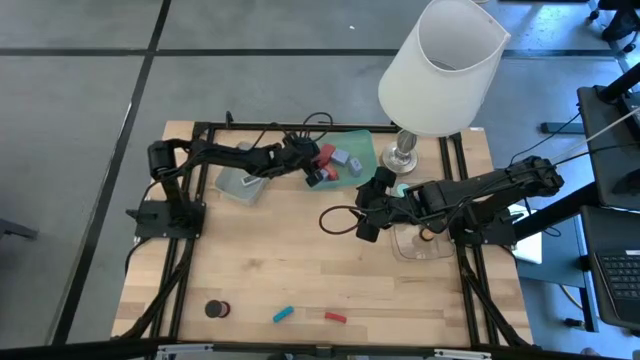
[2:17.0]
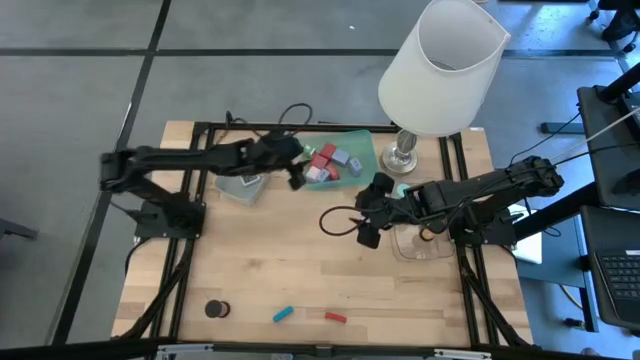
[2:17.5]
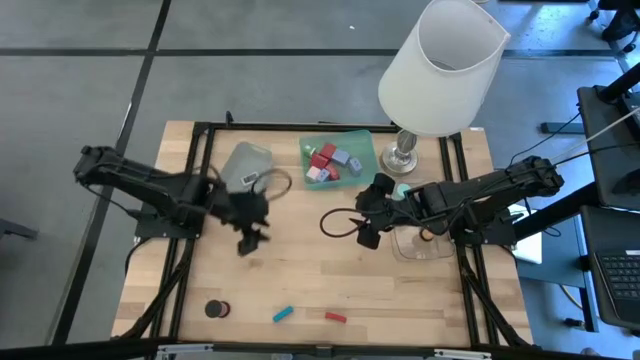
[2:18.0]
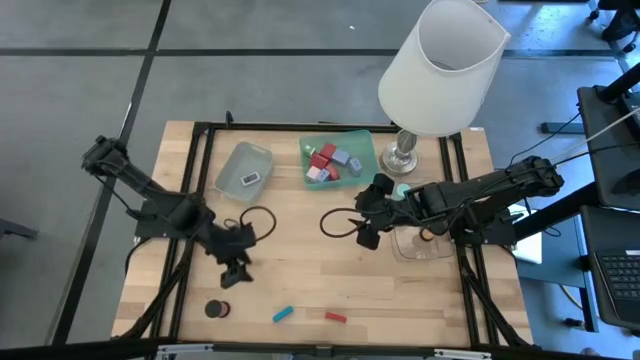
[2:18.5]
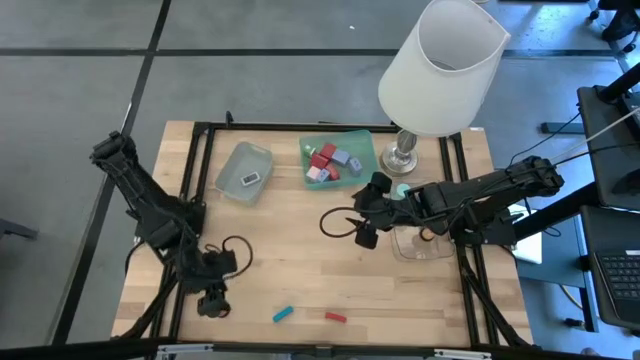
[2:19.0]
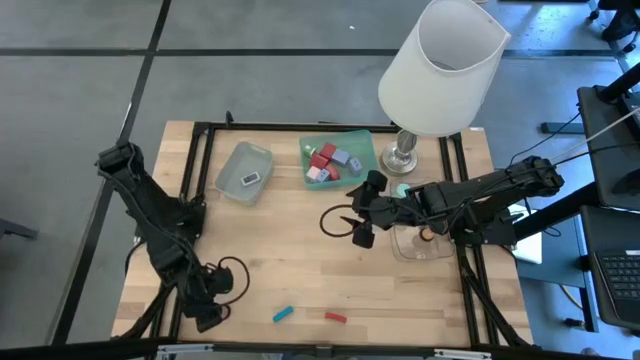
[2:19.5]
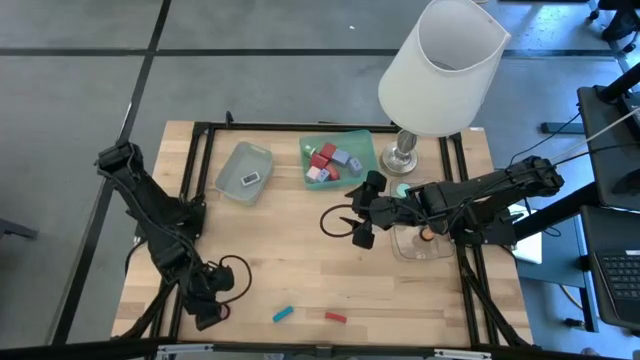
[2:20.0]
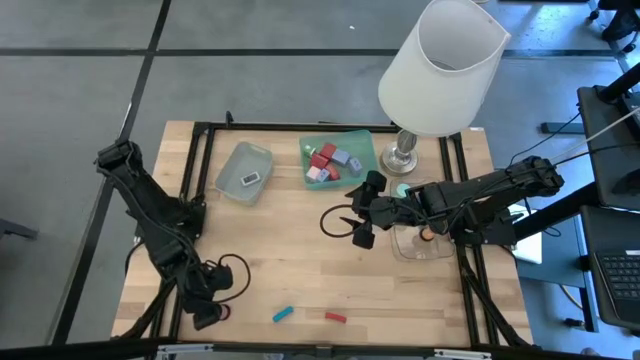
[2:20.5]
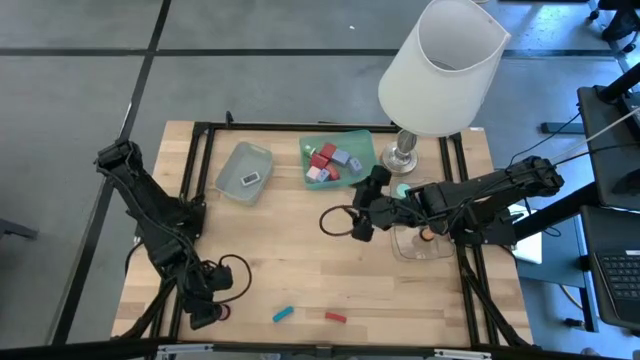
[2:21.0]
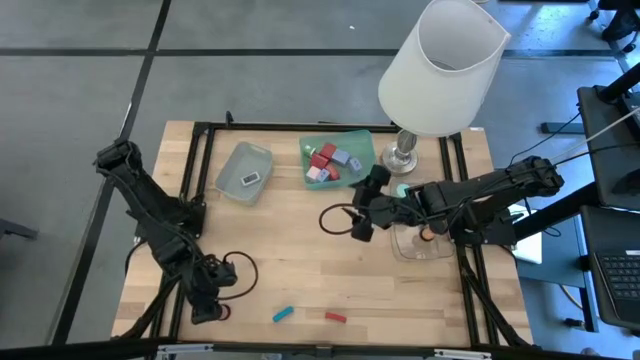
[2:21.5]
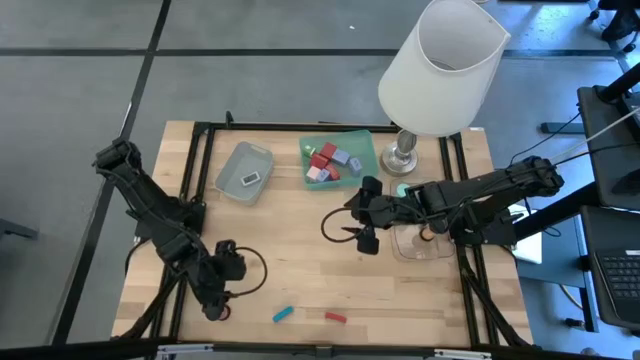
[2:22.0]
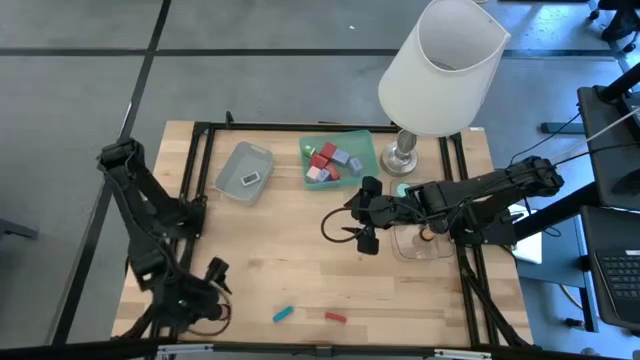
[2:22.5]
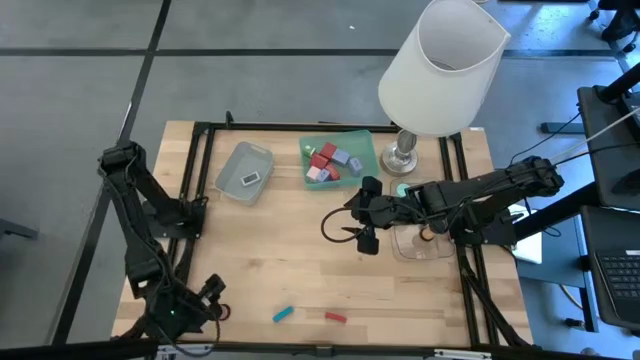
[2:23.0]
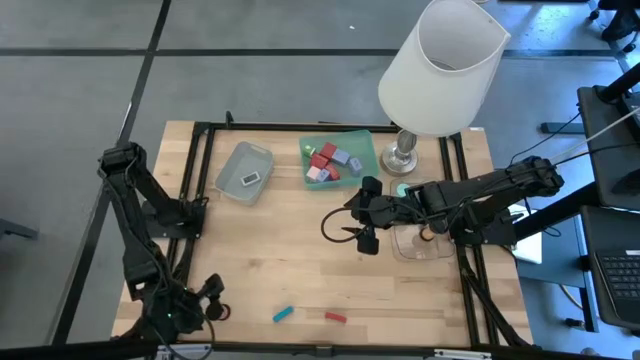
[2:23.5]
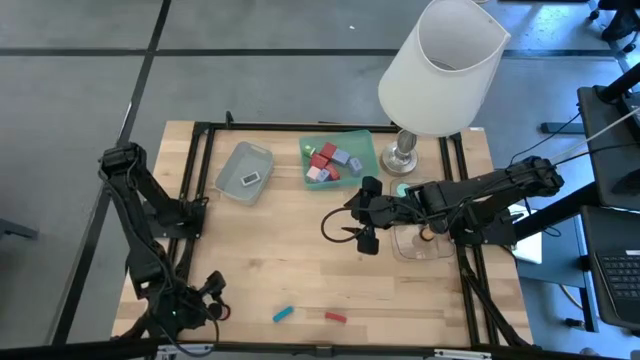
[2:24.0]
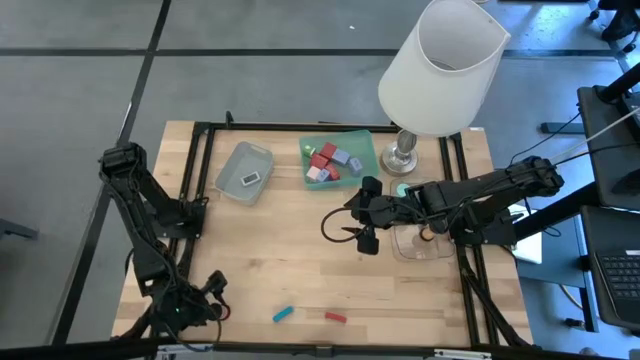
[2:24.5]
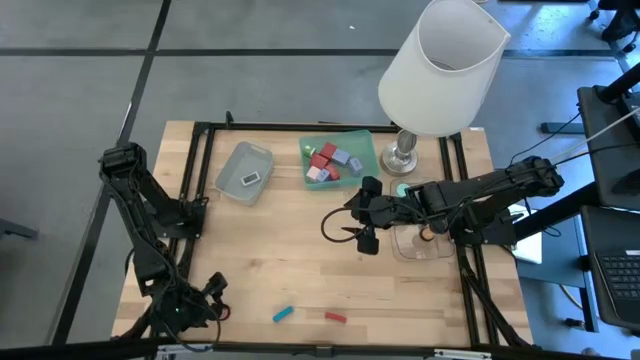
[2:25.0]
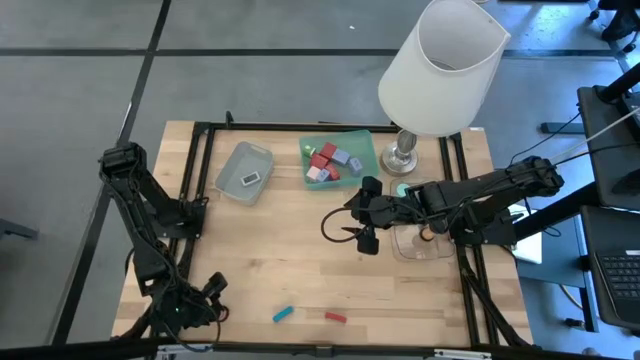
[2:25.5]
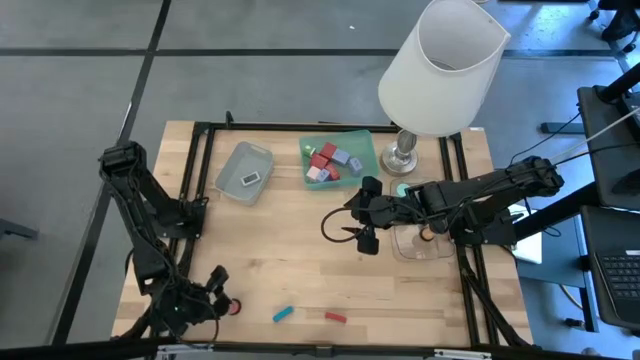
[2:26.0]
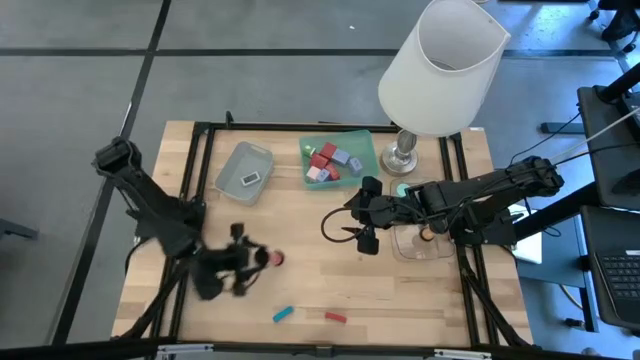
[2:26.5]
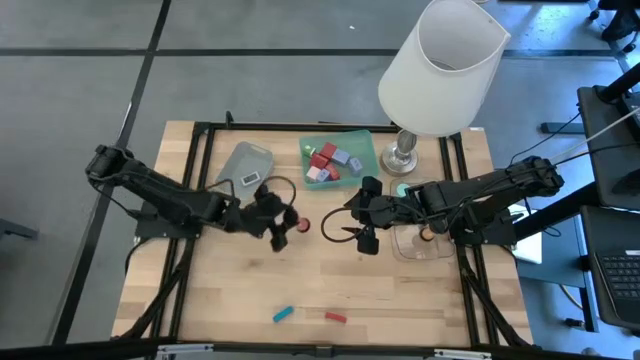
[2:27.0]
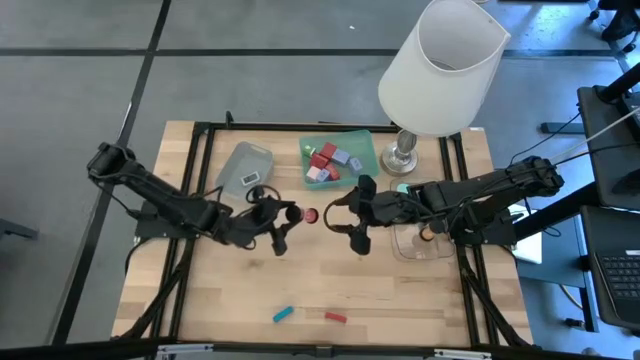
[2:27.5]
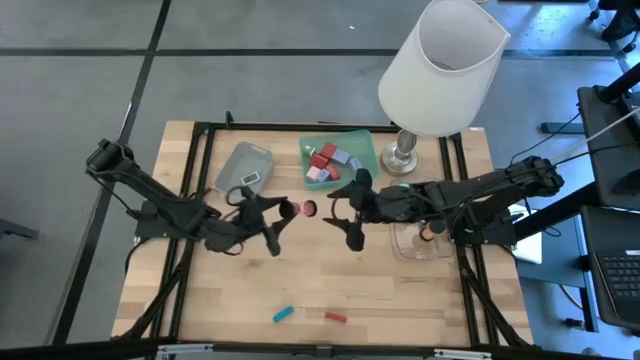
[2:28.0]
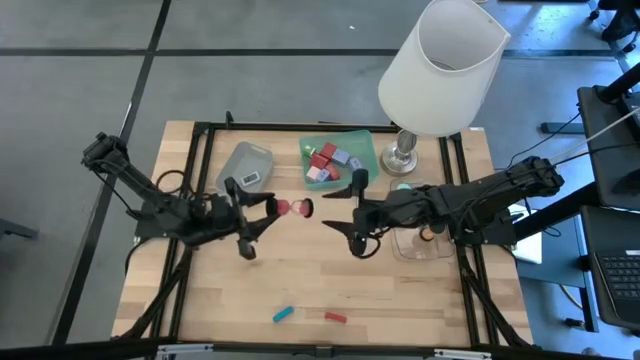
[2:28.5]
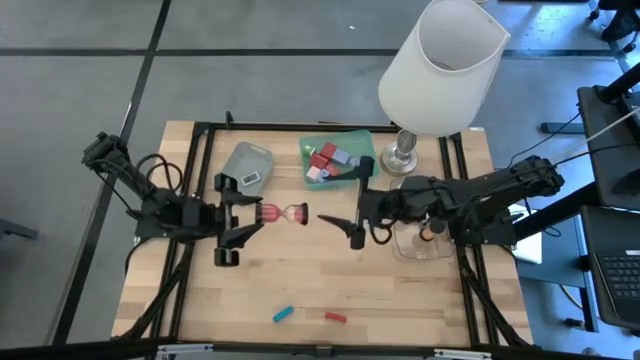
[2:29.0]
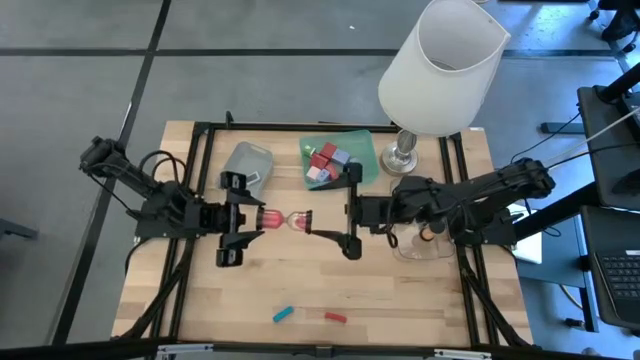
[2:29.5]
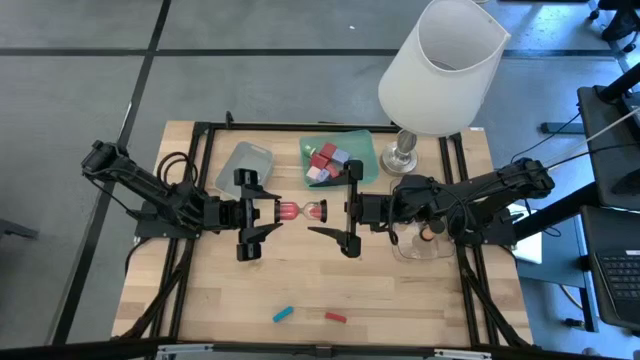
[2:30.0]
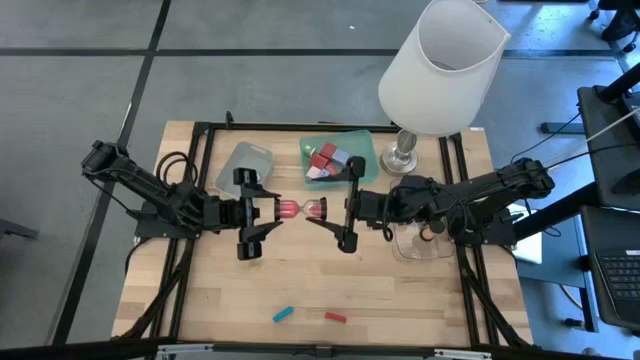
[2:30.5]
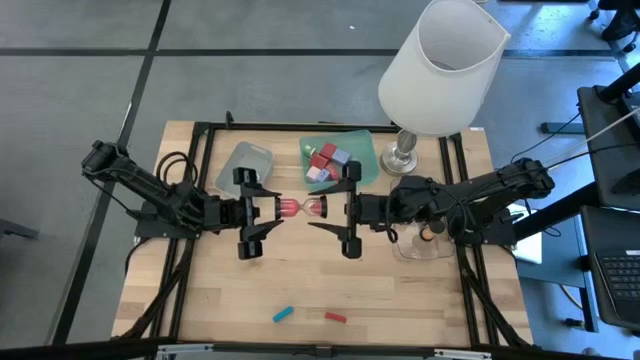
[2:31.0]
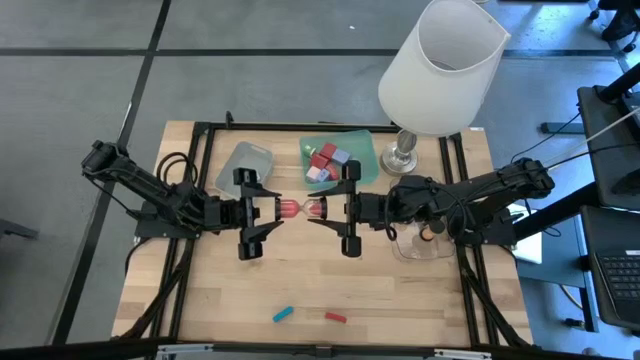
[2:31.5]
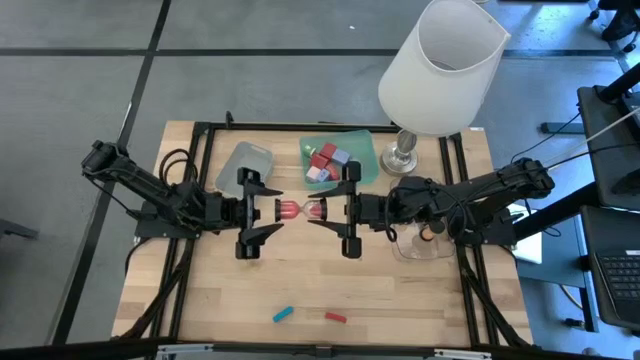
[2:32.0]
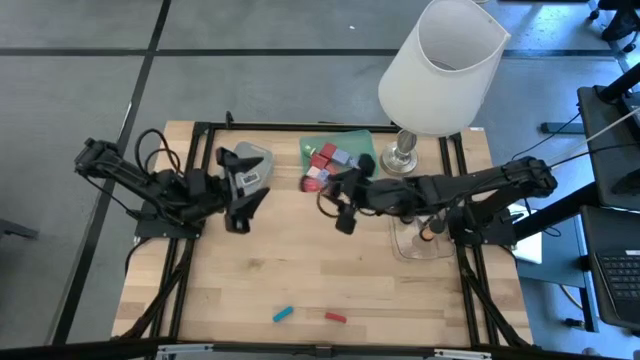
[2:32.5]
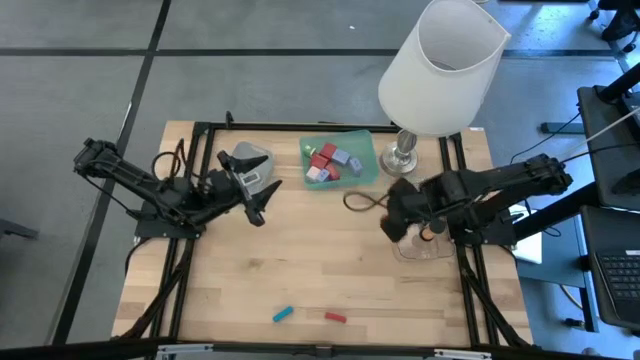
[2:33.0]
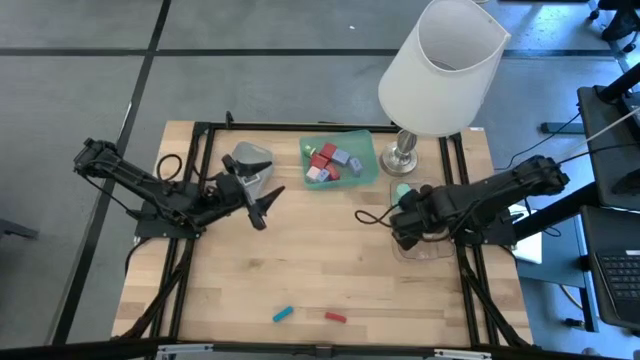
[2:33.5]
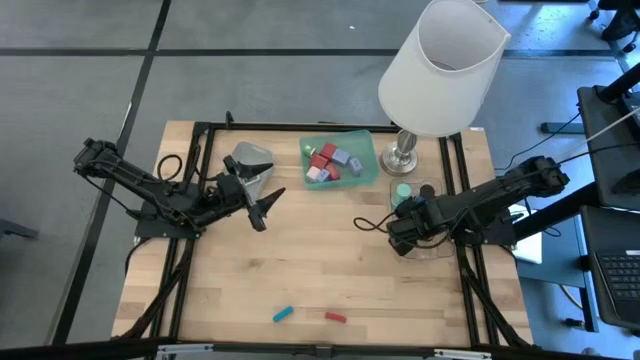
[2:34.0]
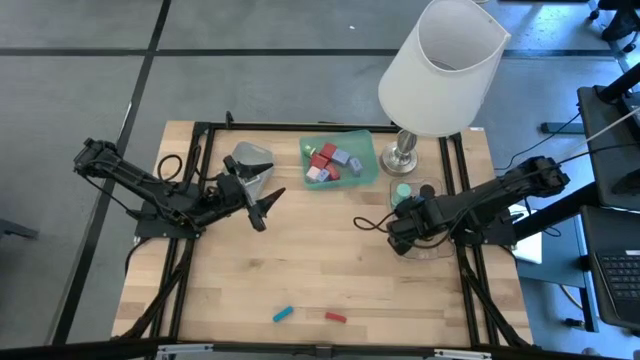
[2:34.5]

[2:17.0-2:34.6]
Task: Pick & Place Office items
Put the red hourglass into the transparent bin

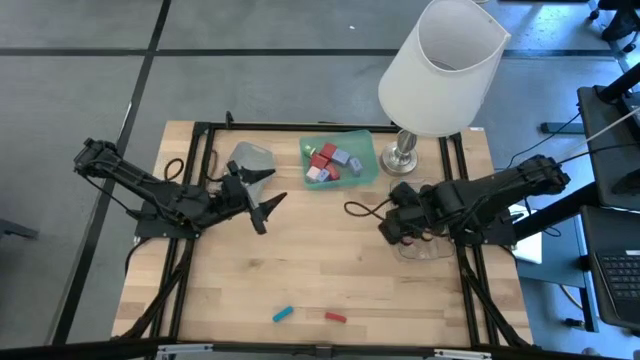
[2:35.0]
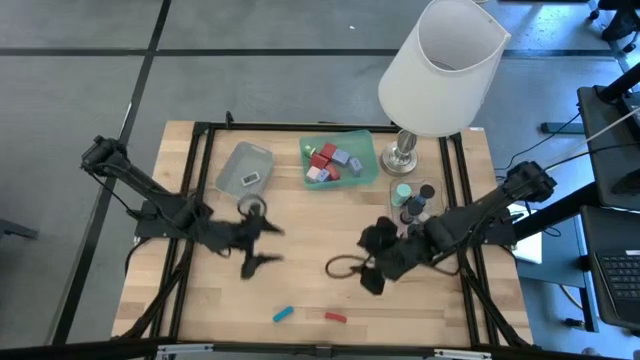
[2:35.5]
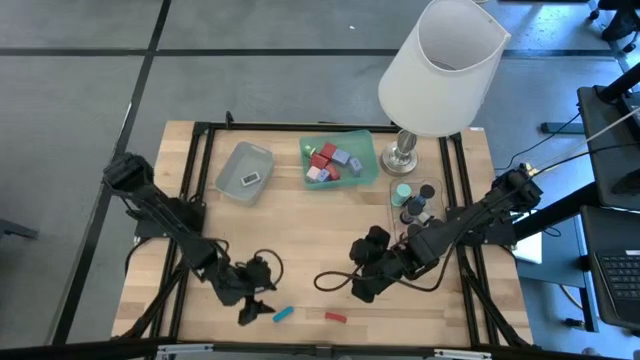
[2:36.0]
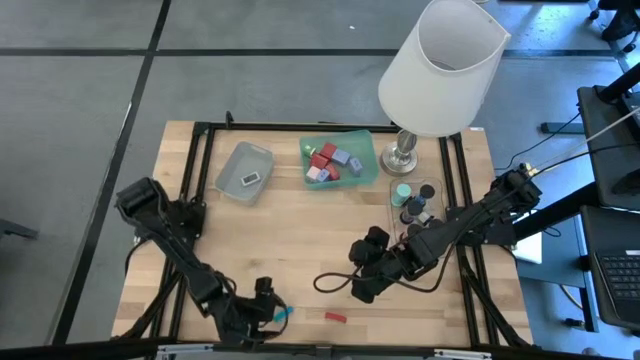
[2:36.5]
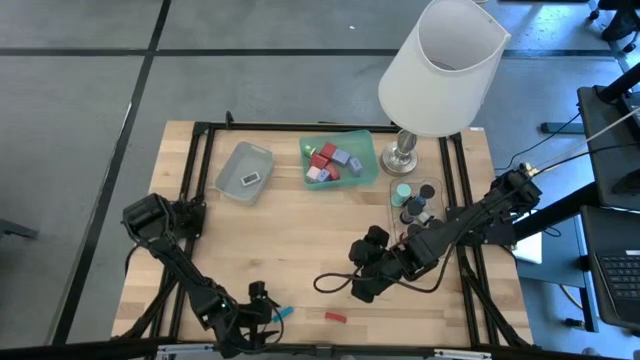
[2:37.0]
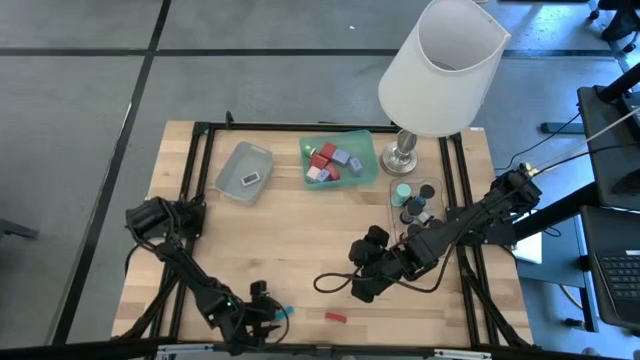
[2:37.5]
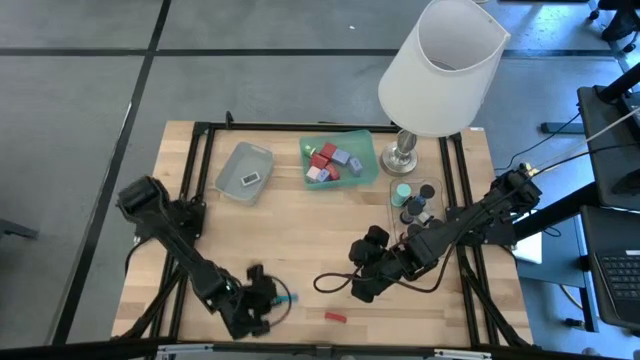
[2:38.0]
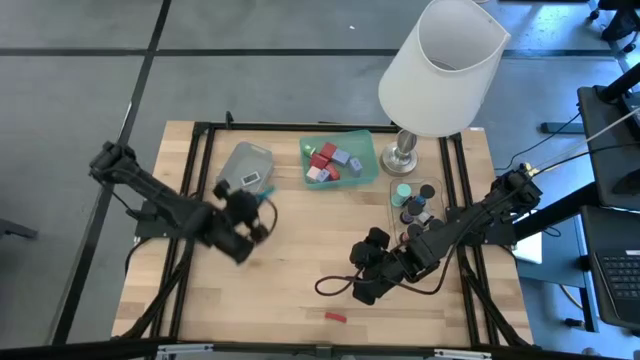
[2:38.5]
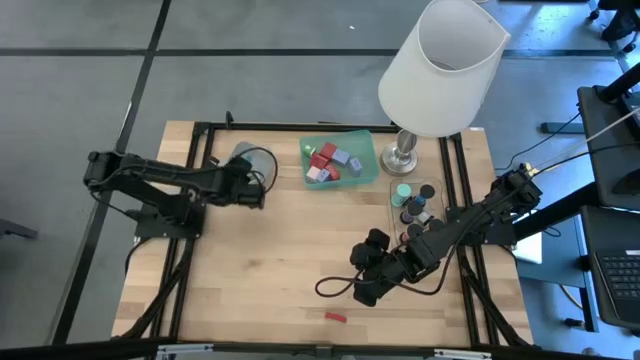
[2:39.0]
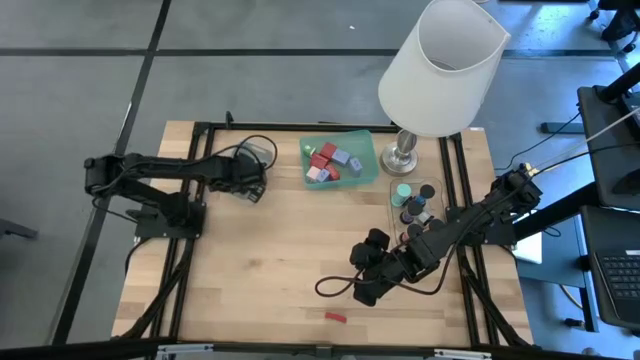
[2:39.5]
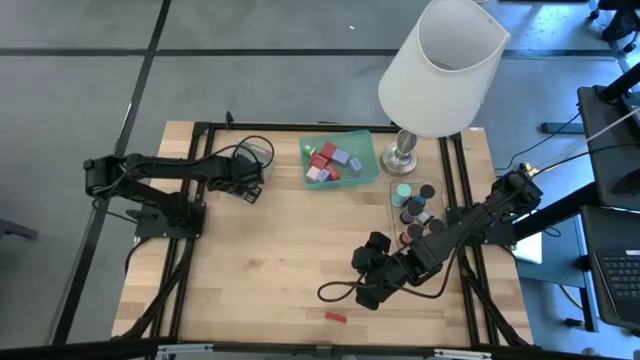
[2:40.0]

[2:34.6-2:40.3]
Put the light blue digital clock into the gray bin
